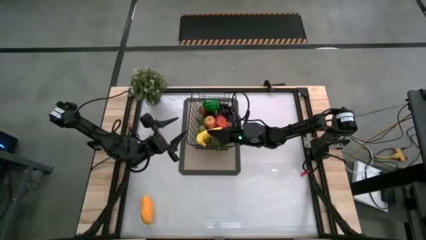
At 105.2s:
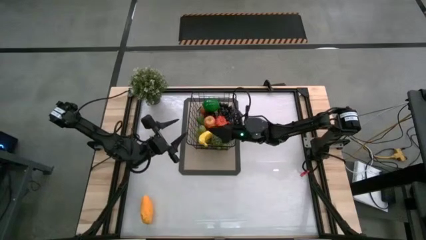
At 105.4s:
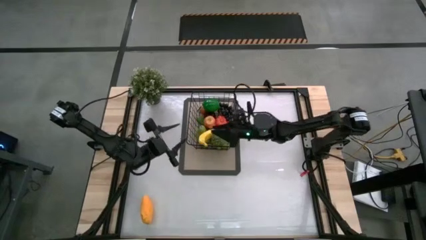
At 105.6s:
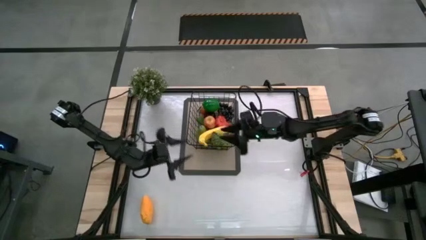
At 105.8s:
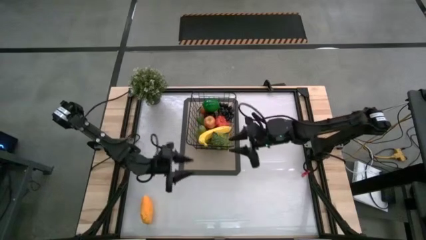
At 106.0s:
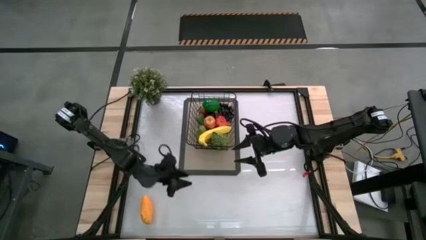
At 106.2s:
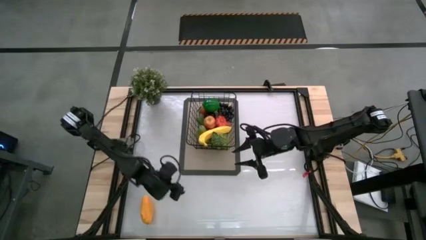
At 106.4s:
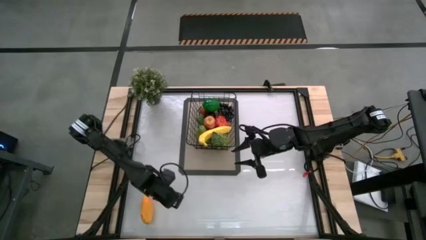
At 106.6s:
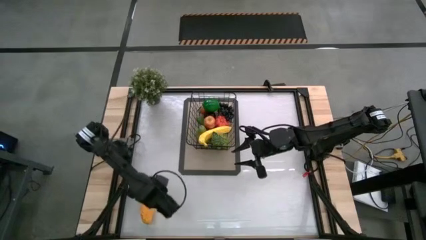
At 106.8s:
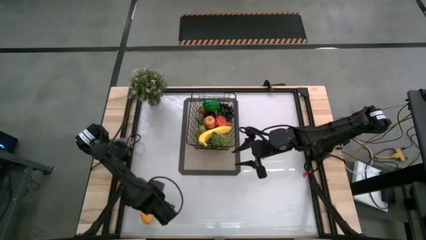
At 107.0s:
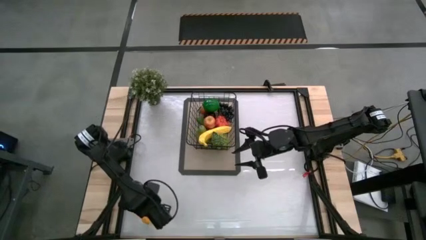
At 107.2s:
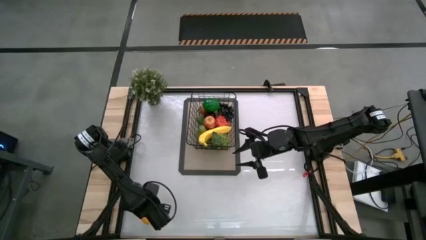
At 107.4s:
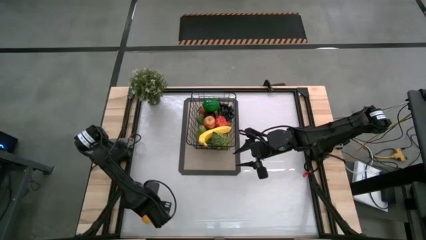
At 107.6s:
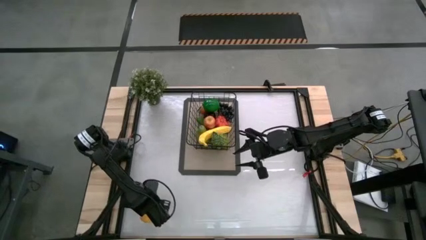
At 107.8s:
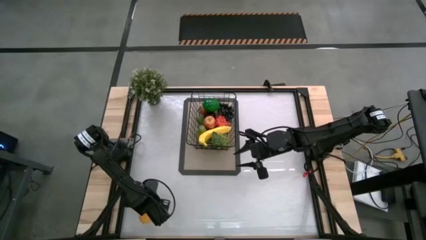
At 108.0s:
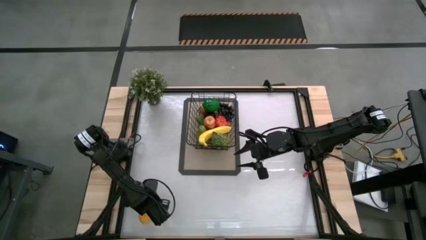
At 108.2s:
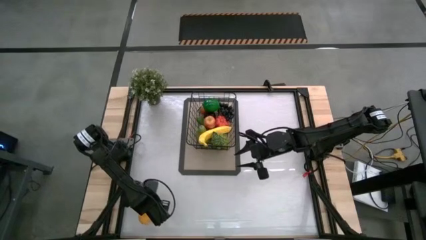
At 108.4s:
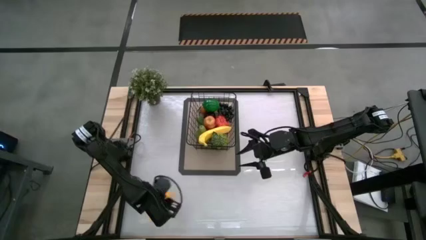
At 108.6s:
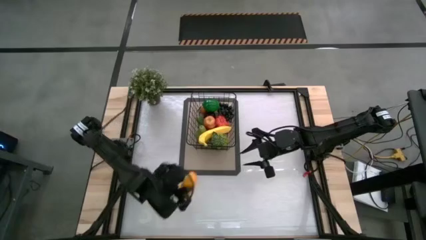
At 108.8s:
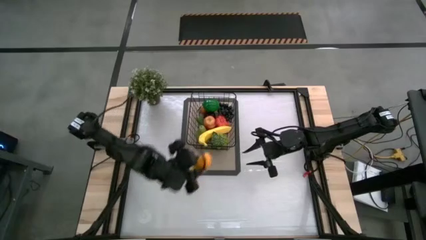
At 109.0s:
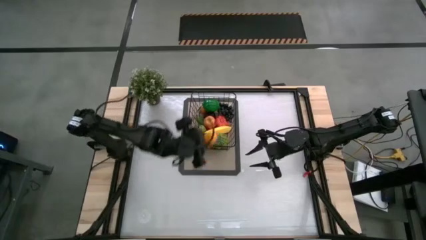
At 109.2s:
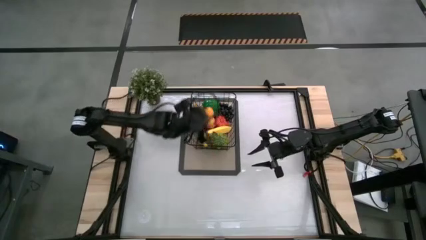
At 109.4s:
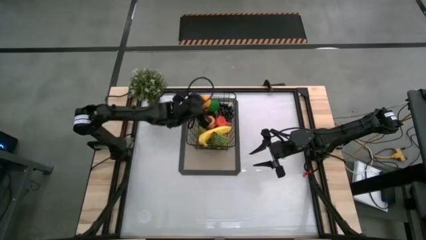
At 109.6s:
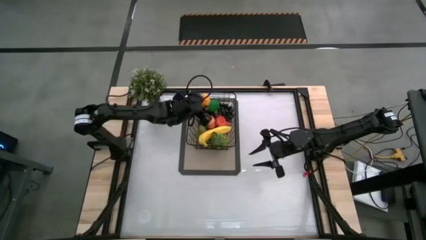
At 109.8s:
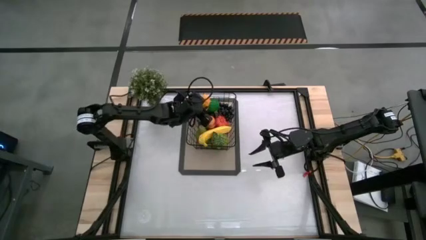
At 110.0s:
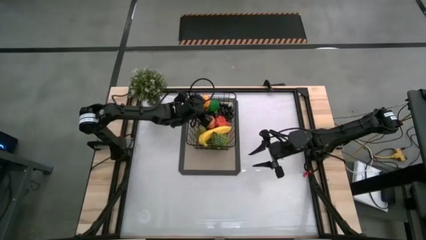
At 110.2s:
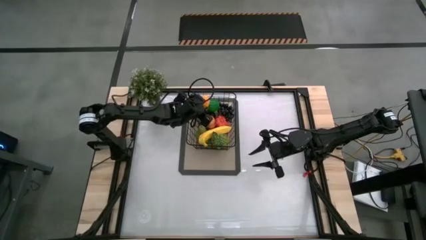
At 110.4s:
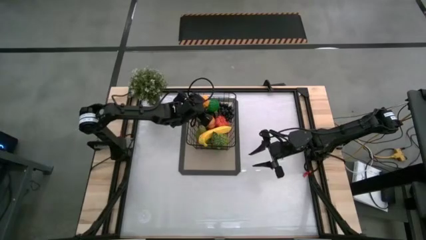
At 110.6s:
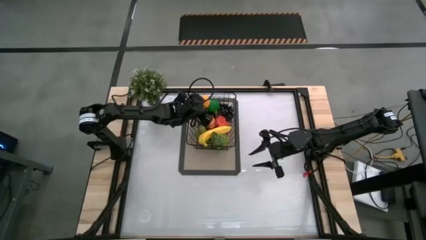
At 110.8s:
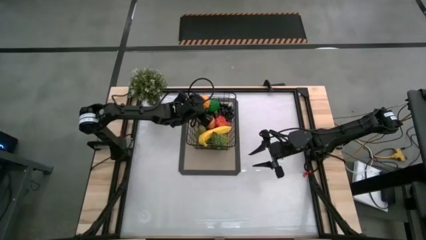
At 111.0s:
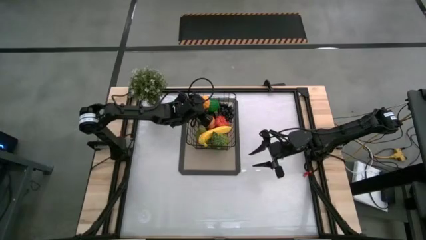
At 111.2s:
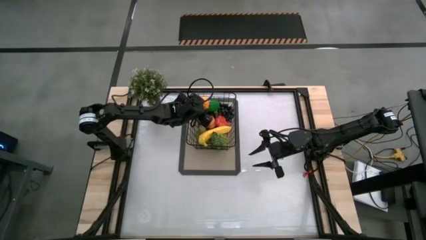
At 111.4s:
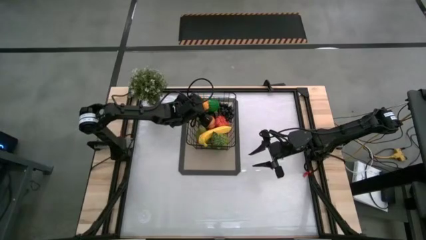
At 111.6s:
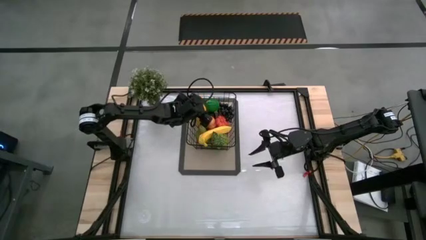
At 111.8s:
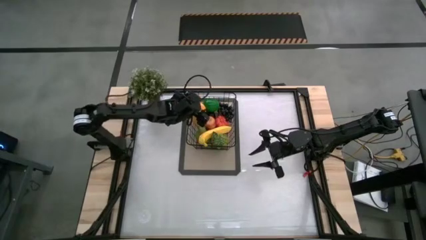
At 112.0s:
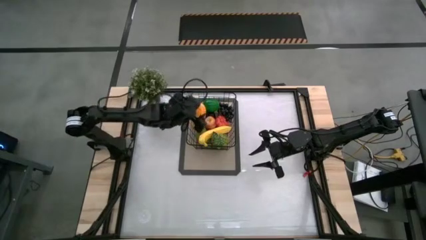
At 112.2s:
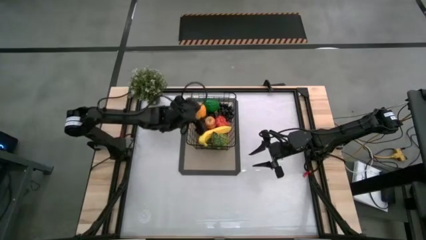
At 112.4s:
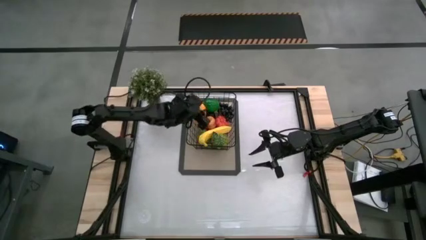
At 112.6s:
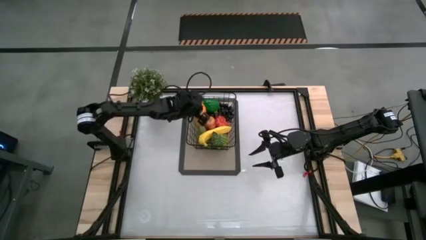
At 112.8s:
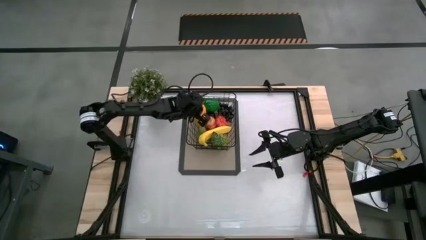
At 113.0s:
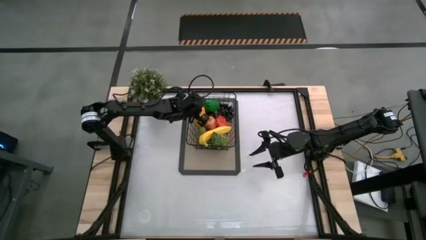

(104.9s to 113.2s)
Task: Build produce basket
Put the mango into the black wire basket

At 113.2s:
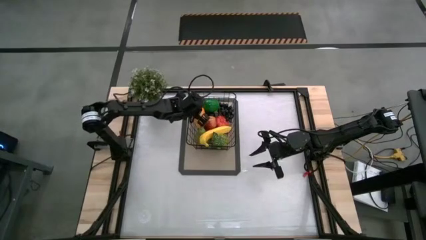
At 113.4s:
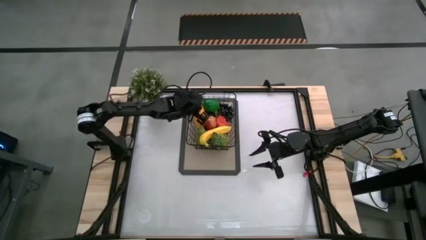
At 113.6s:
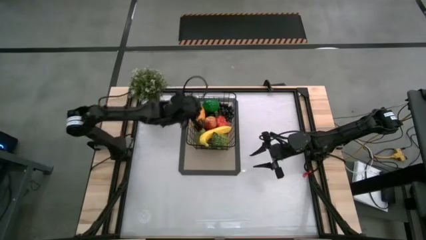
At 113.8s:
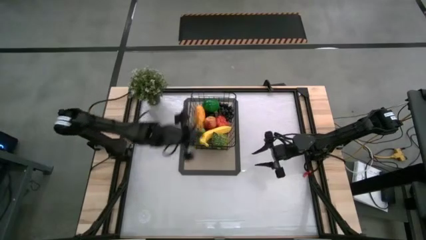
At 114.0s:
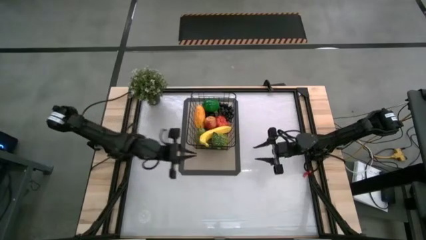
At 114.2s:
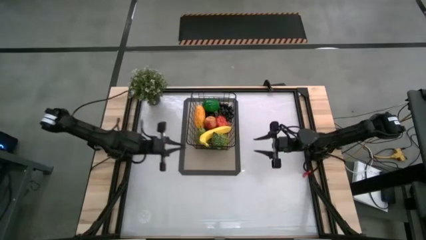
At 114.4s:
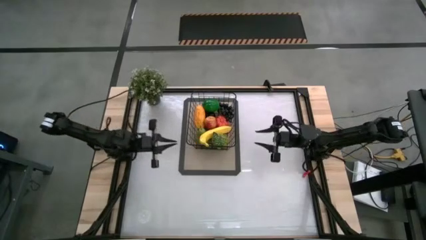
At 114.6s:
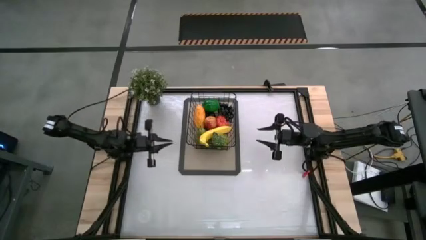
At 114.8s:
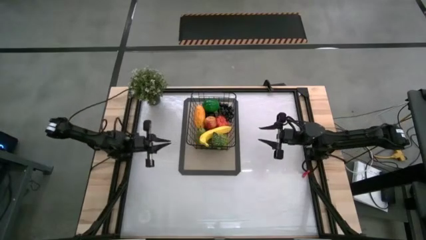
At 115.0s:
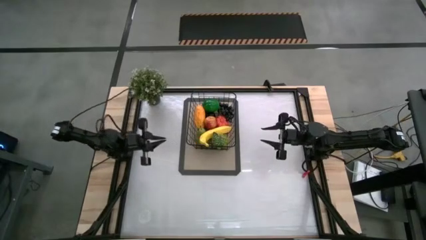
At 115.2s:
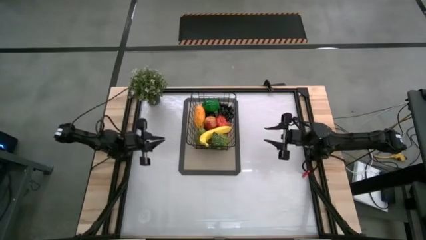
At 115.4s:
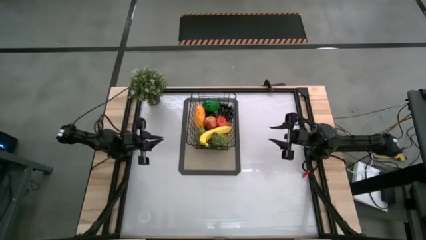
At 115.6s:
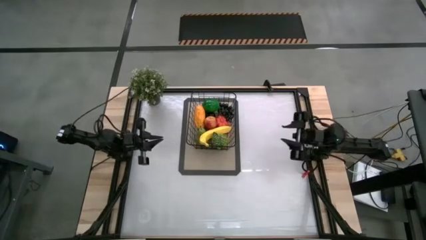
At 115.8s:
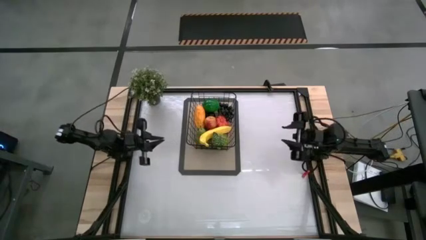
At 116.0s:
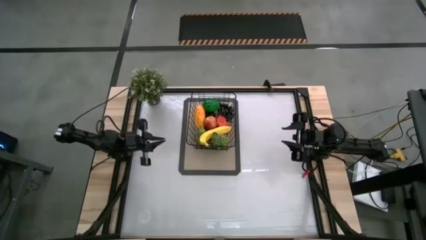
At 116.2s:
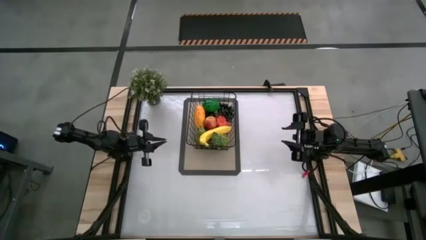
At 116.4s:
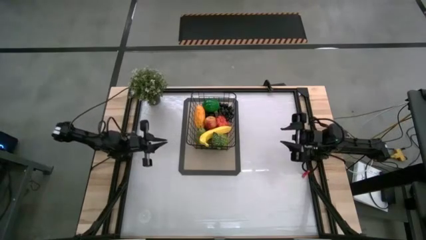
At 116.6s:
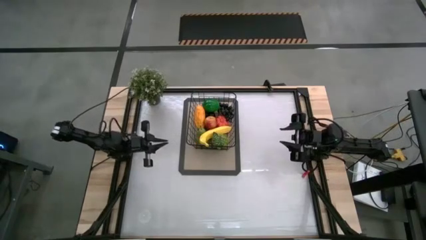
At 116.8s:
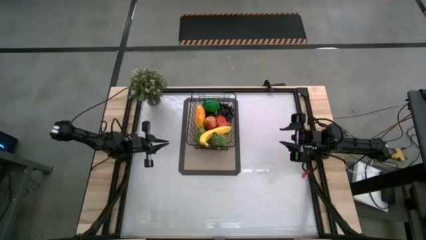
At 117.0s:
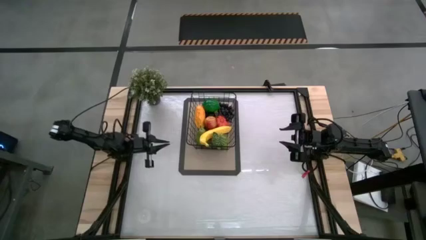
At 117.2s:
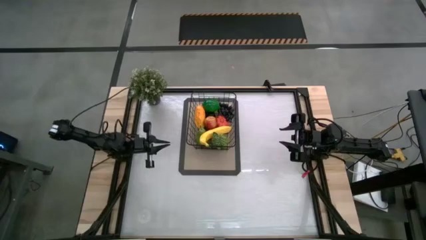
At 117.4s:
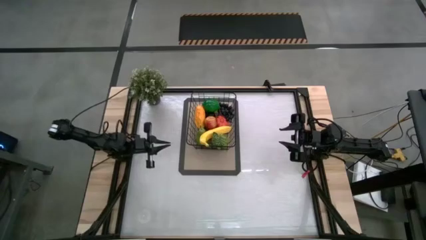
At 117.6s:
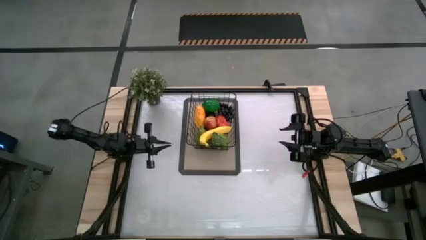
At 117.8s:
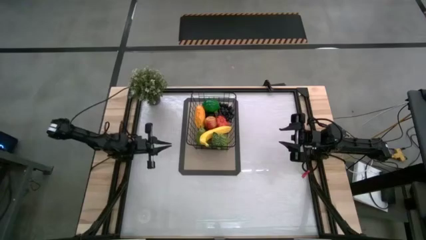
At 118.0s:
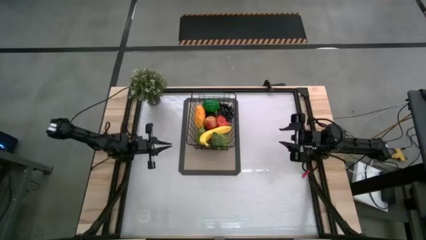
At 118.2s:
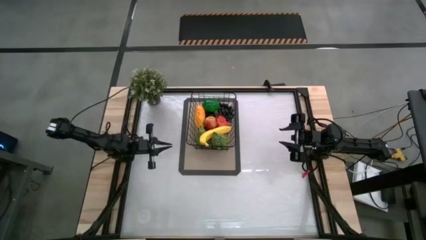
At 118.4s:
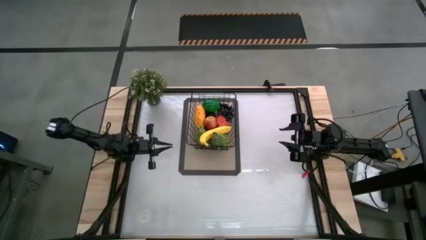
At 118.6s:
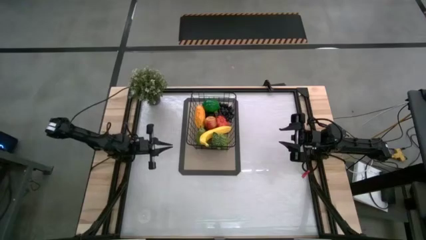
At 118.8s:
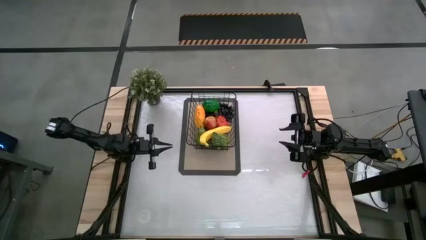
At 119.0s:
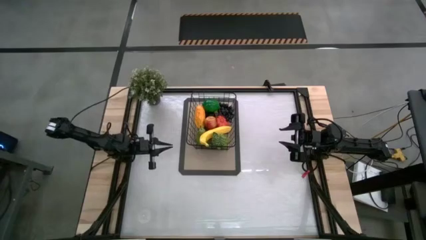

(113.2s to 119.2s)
Return to Home Position
